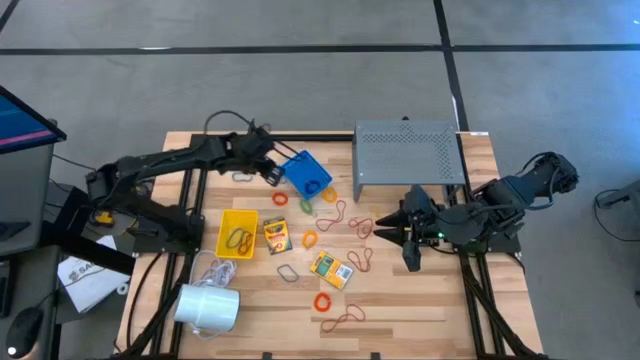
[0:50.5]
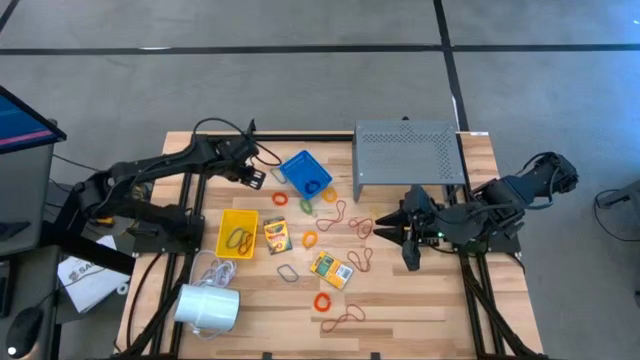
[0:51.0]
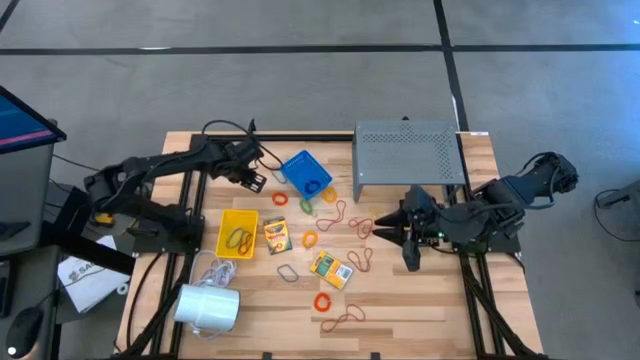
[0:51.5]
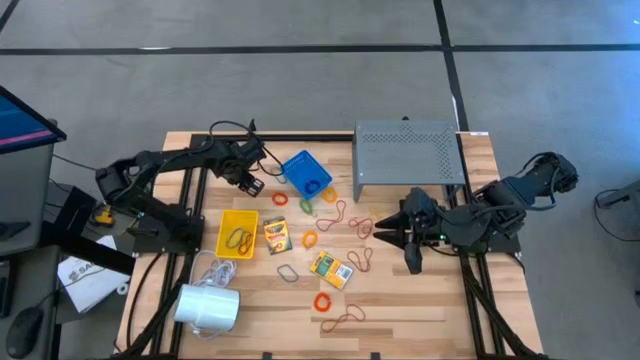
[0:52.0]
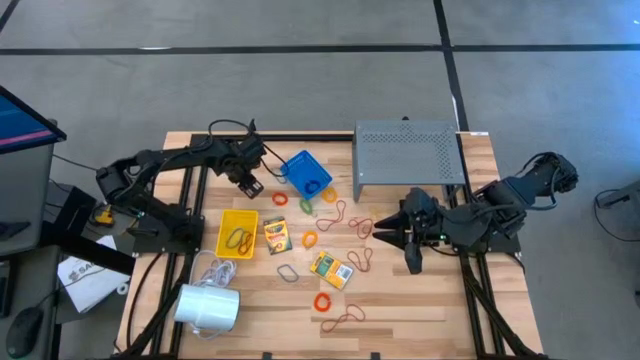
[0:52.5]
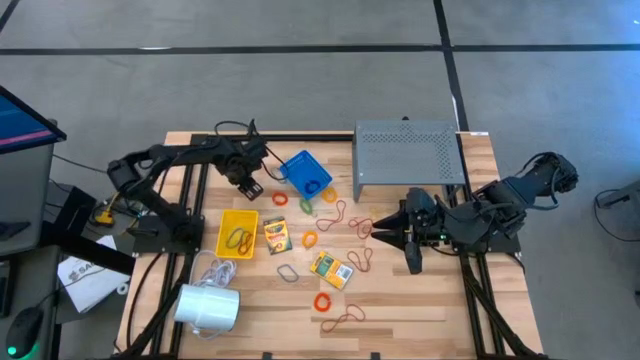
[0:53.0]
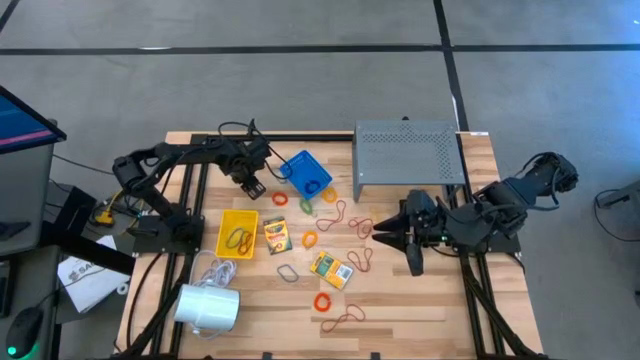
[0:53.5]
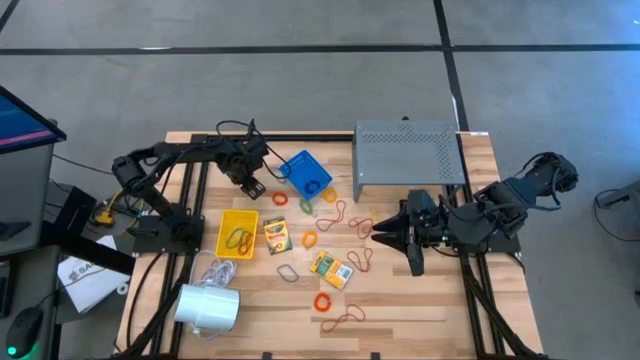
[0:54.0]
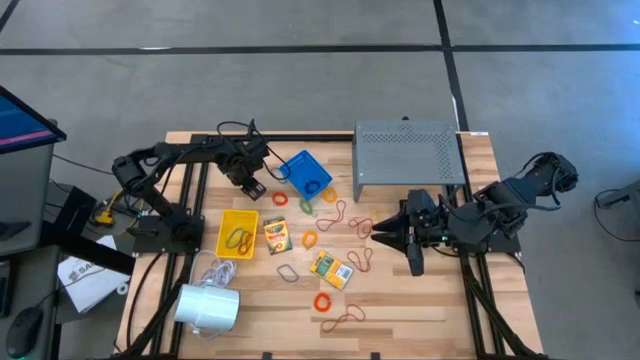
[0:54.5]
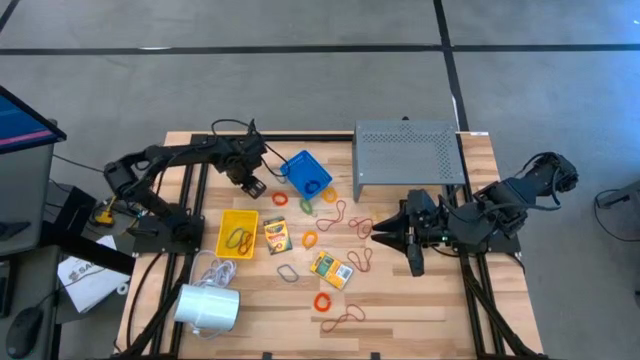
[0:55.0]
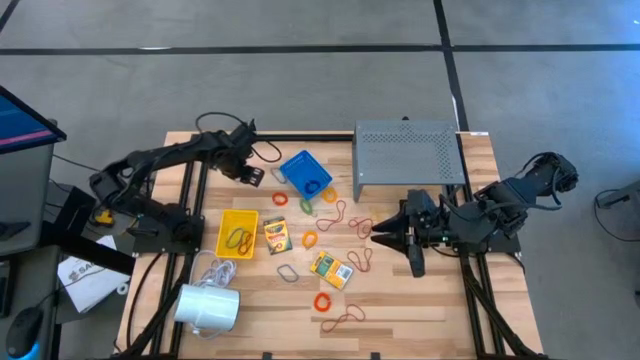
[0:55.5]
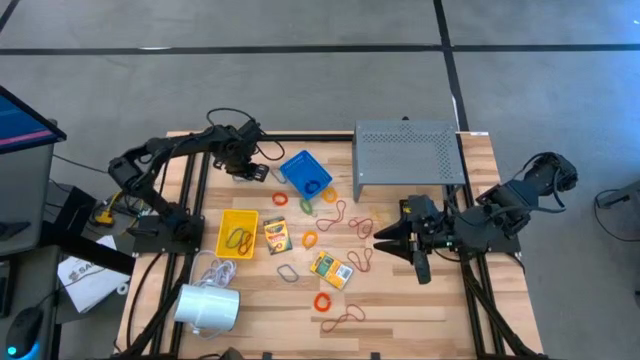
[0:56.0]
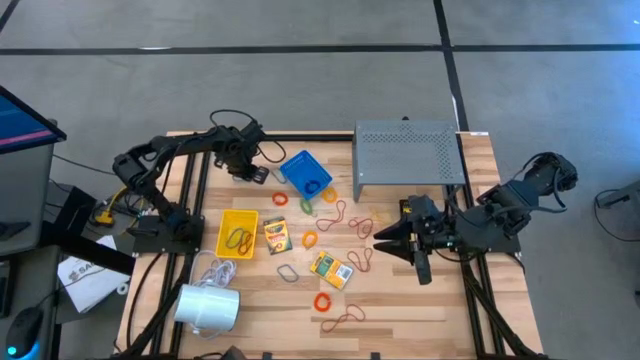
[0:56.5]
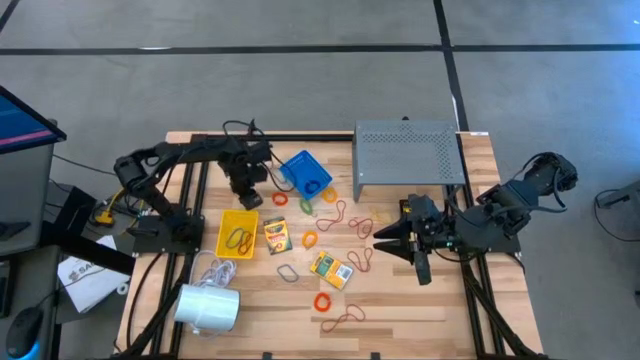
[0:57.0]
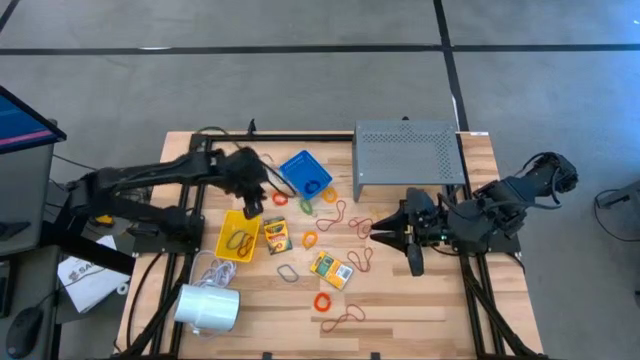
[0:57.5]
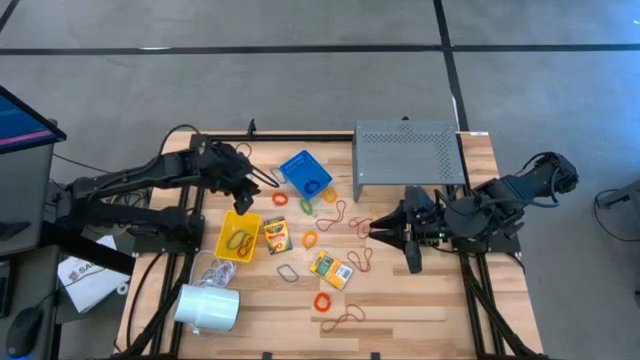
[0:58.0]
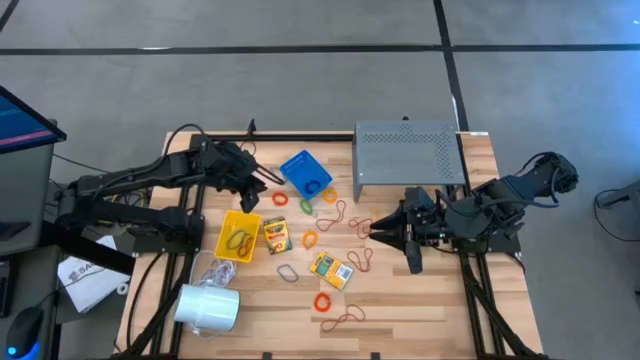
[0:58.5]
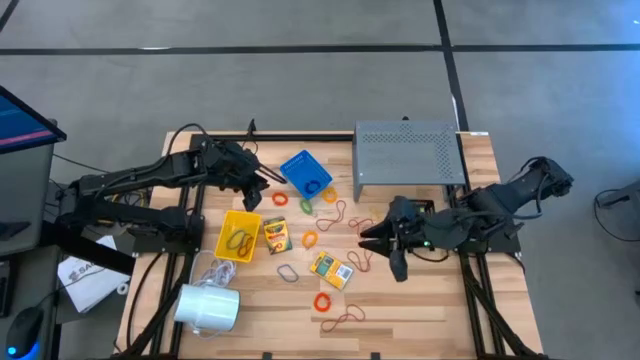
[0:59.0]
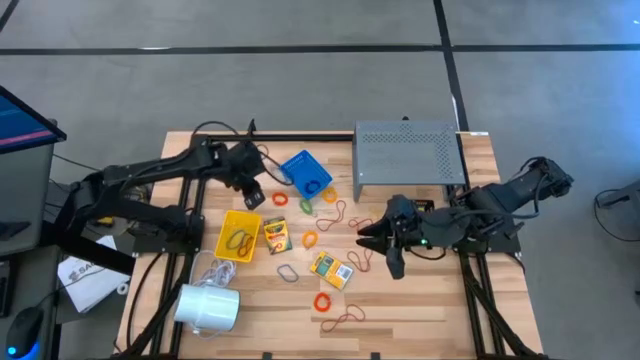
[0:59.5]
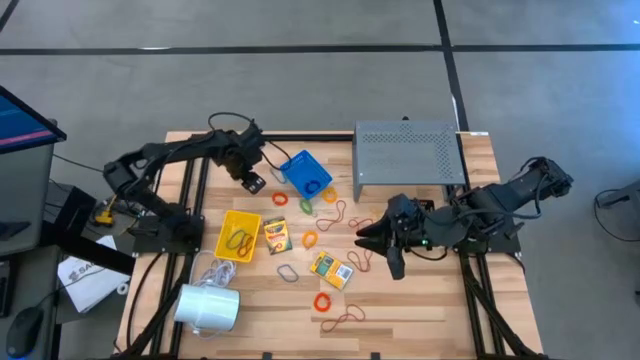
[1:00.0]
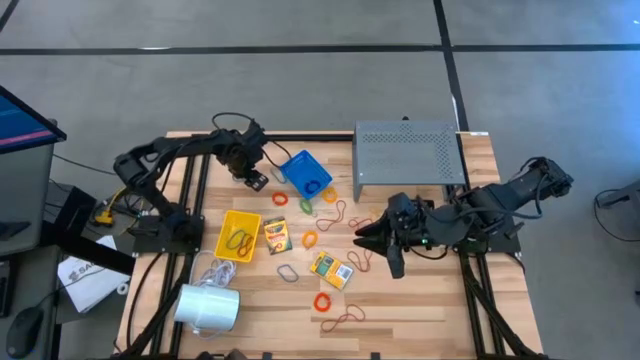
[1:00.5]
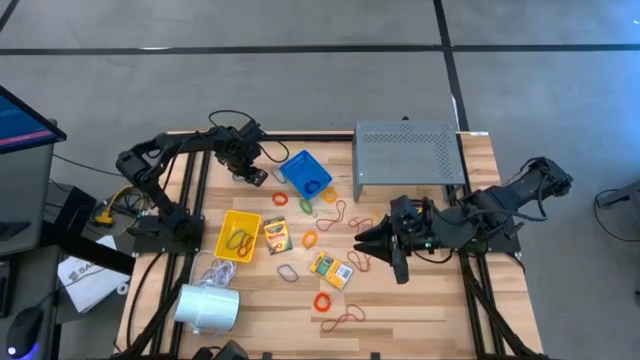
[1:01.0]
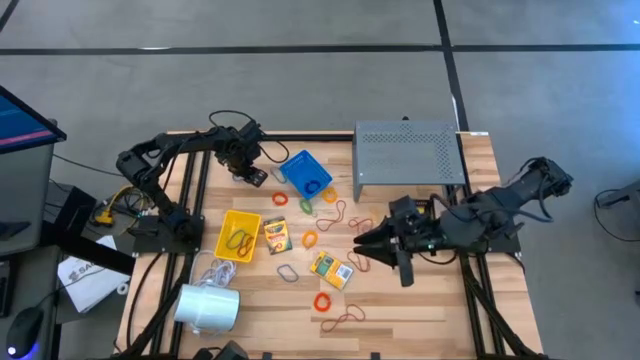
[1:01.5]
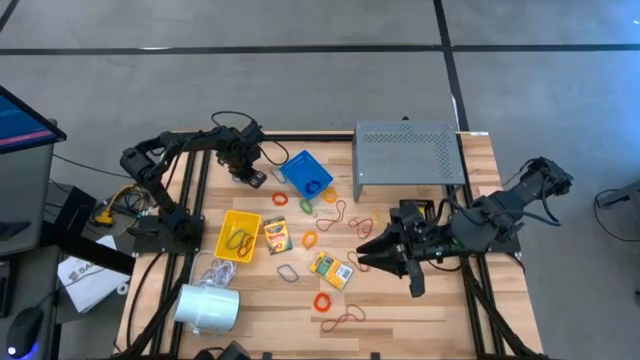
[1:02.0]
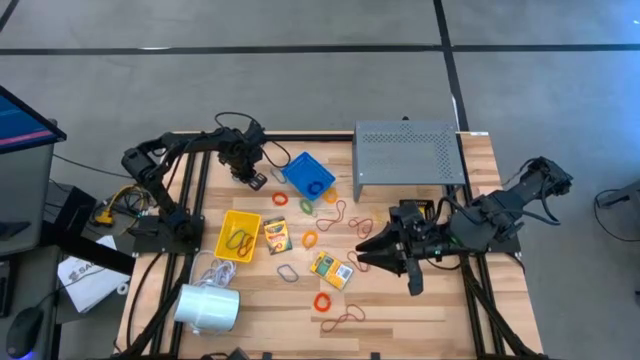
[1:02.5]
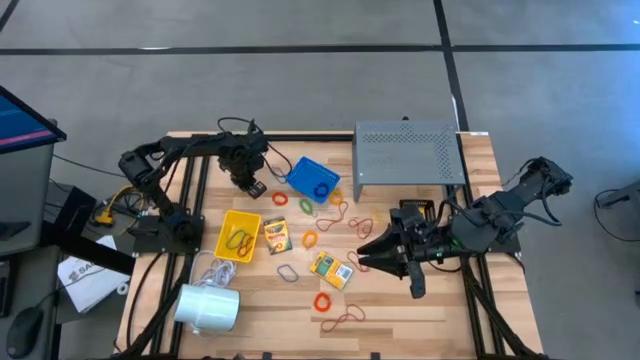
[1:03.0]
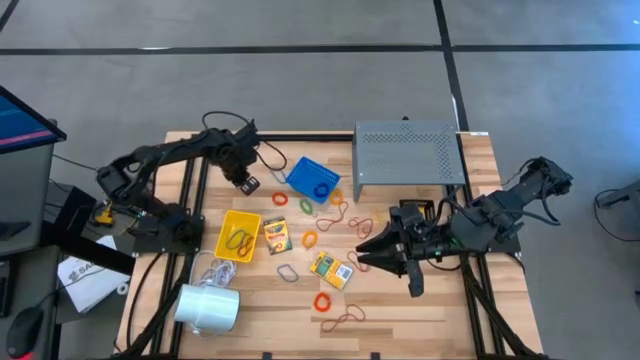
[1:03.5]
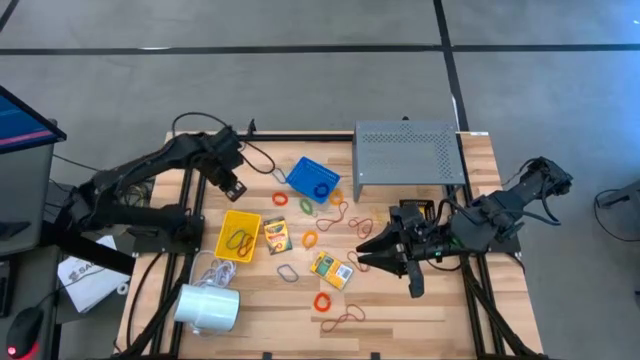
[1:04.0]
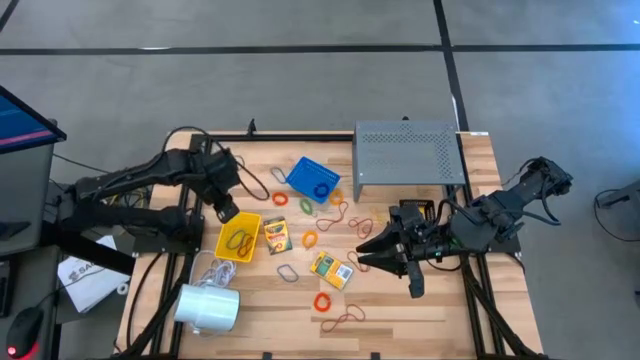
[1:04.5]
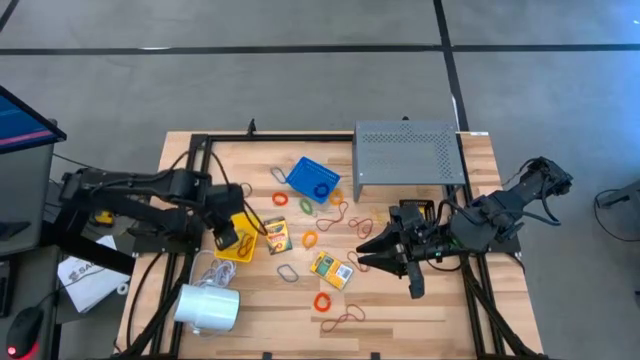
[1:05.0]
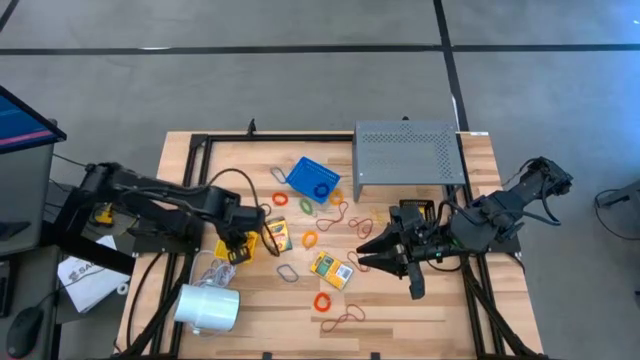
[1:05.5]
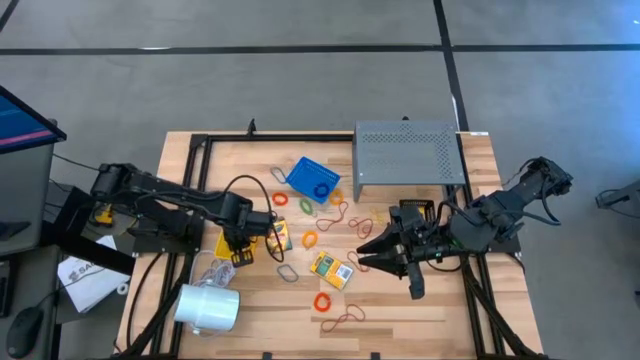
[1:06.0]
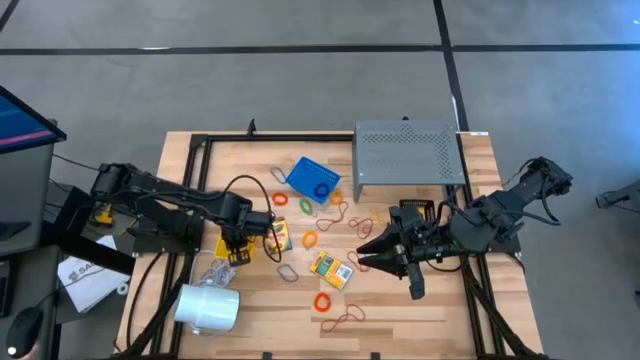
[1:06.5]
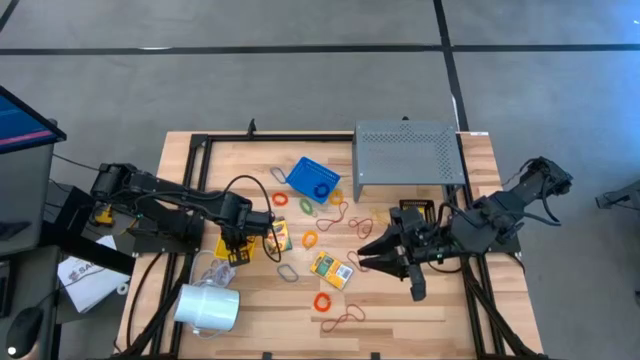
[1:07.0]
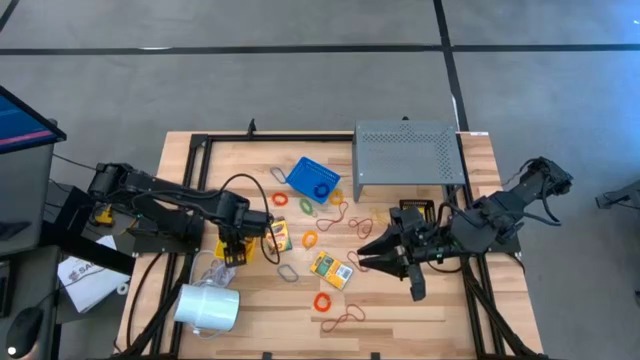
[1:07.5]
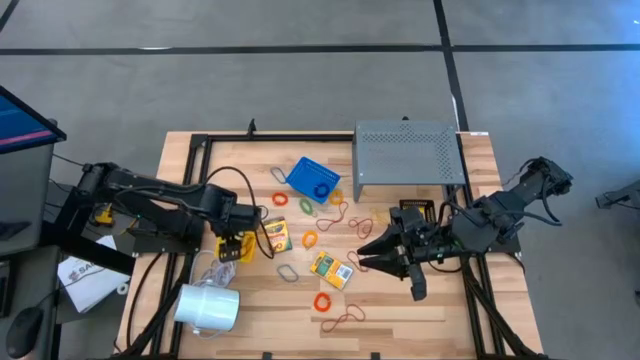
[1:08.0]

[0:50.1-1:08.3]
Task: Pick & Place Office Desk Supplies
Put the blue rubber band into the yellow bin

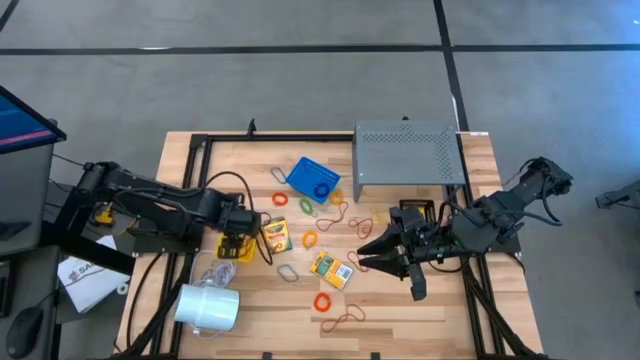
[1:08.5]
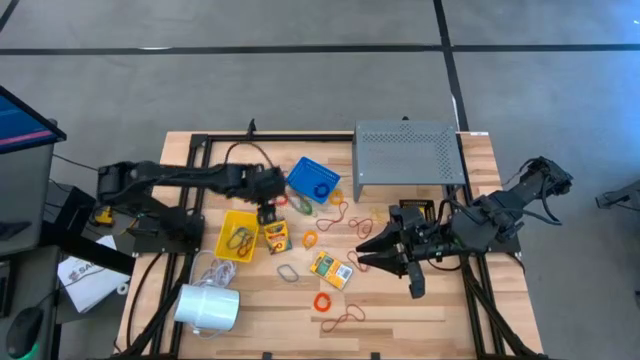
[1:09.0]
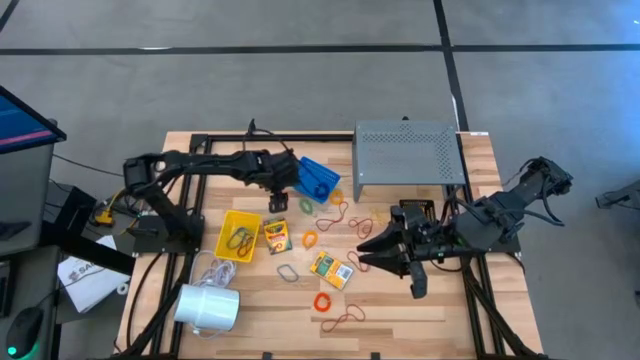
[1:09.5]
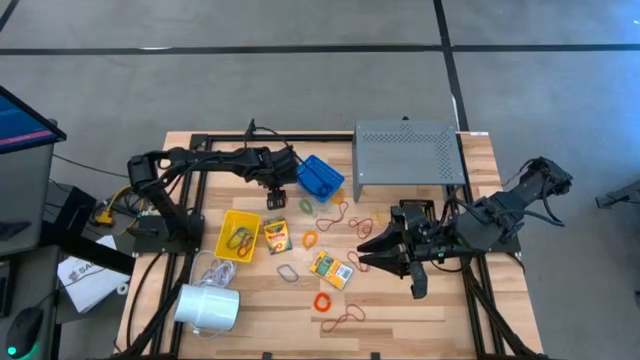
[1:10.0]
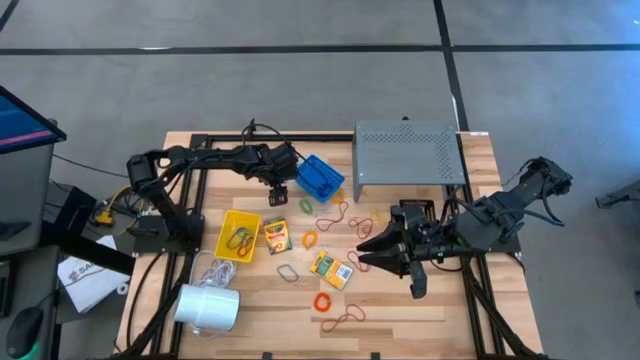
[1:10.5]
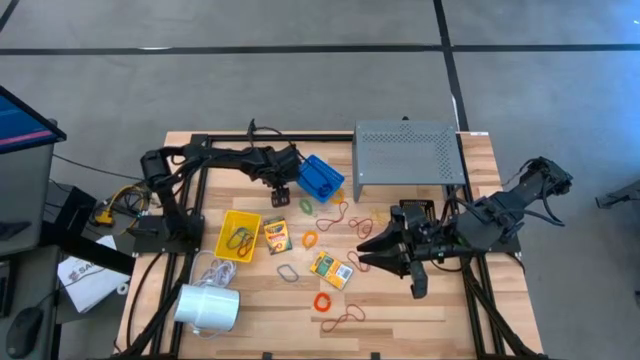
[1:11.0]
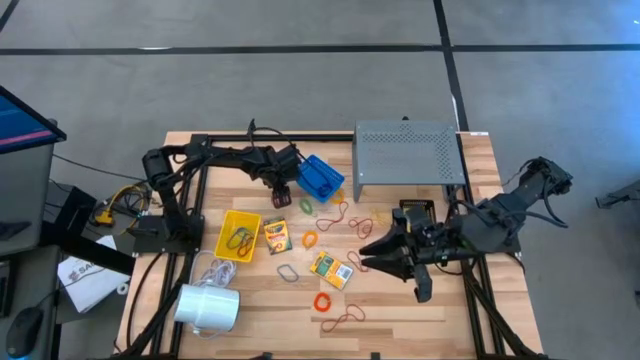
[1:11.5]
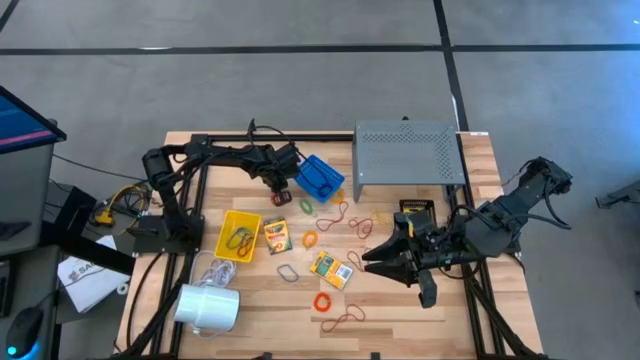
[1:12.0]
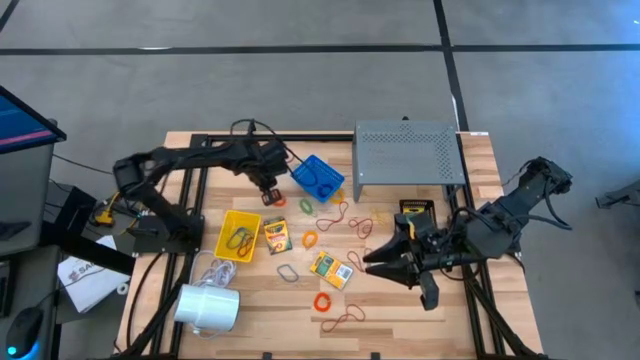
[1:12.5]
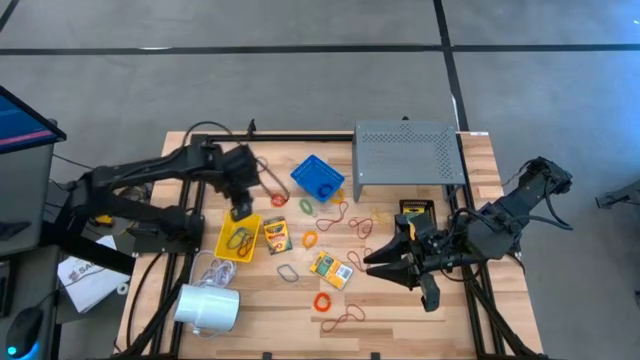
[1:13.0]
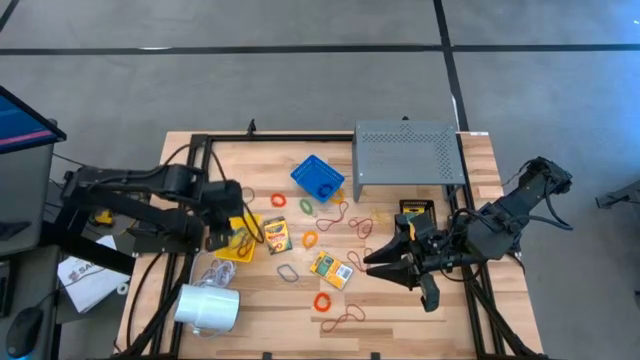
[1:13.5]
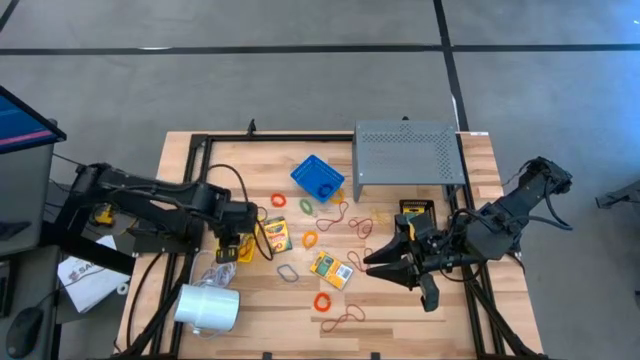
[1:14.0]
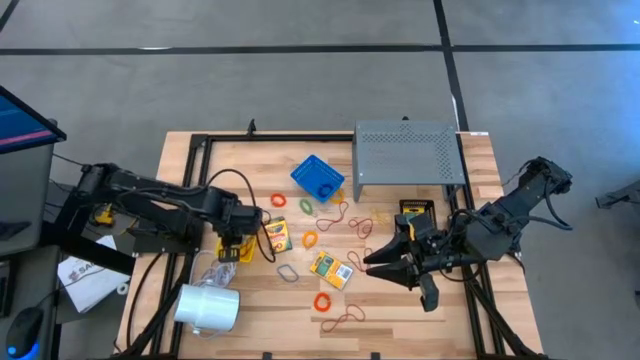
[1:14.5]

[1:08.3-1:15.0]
Put the blue rubber band into the yellow bin
